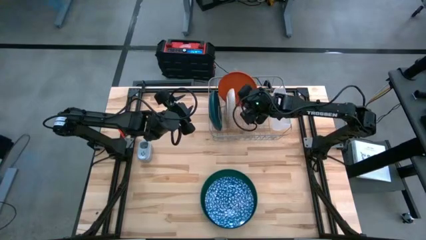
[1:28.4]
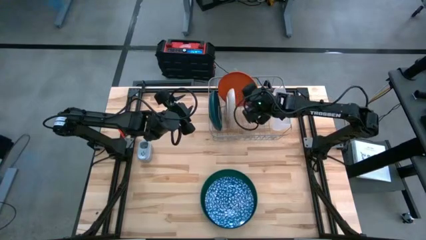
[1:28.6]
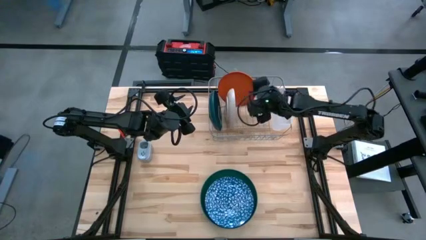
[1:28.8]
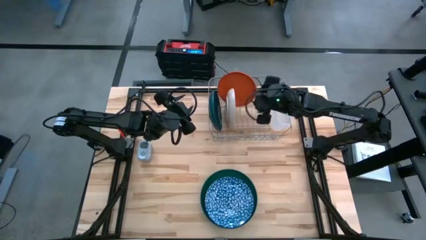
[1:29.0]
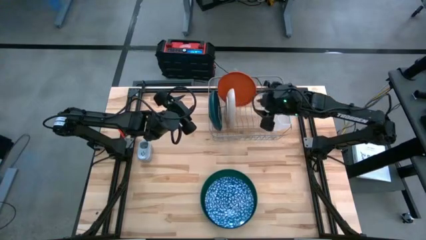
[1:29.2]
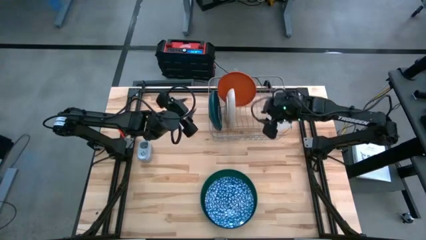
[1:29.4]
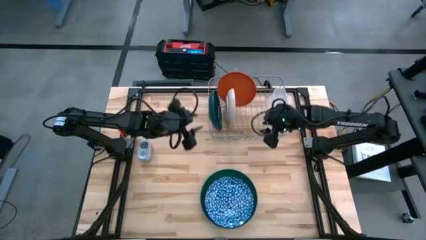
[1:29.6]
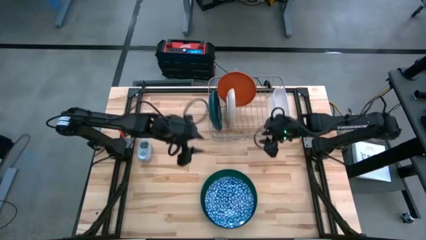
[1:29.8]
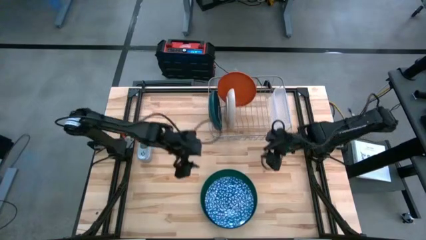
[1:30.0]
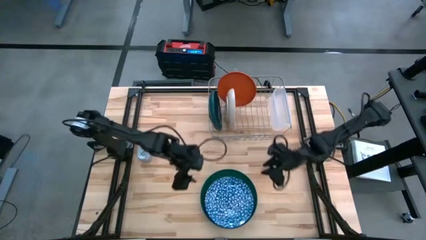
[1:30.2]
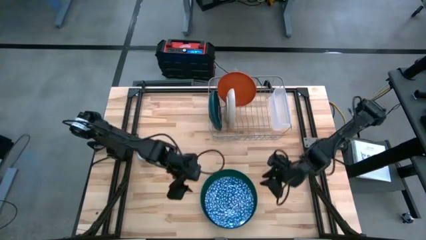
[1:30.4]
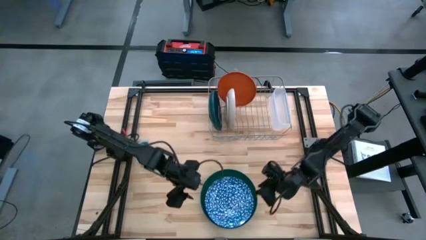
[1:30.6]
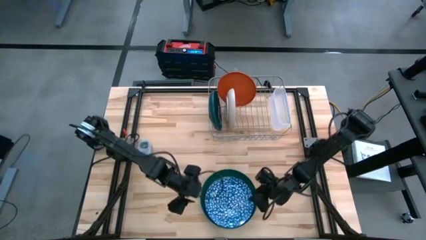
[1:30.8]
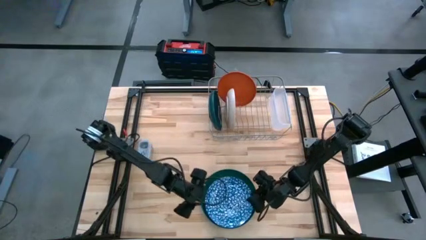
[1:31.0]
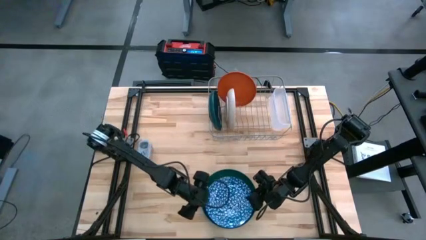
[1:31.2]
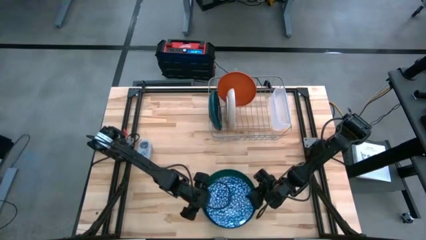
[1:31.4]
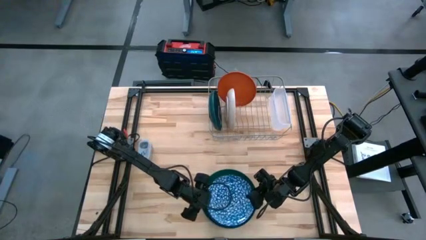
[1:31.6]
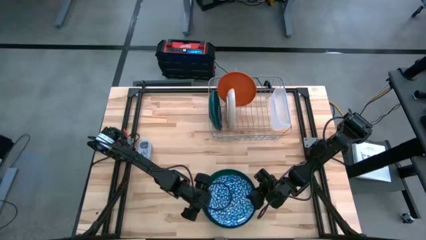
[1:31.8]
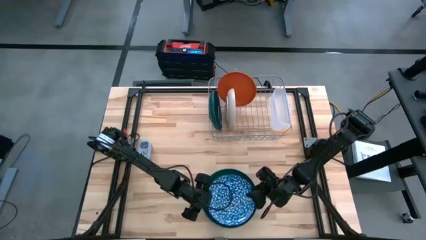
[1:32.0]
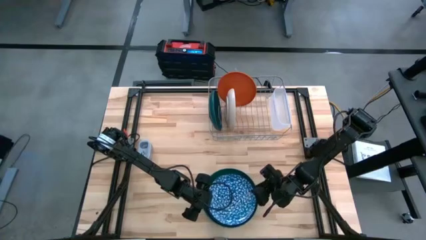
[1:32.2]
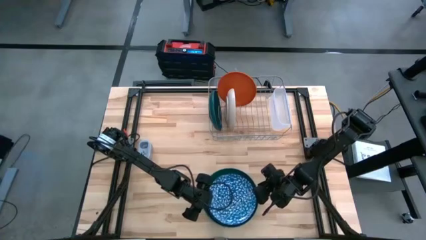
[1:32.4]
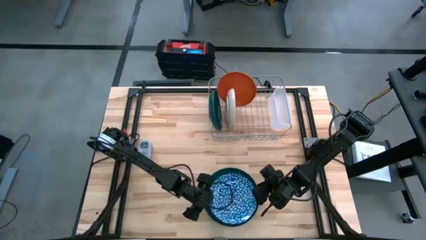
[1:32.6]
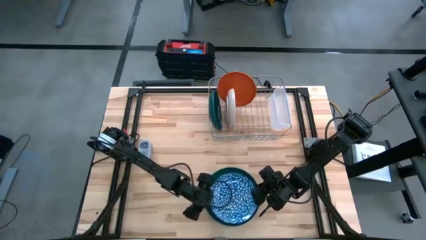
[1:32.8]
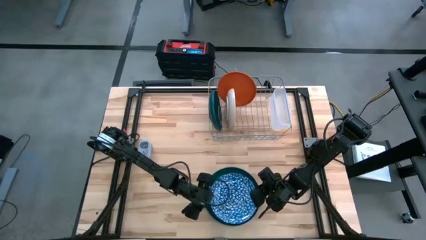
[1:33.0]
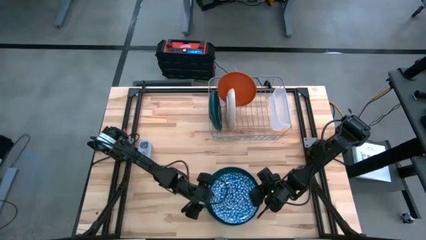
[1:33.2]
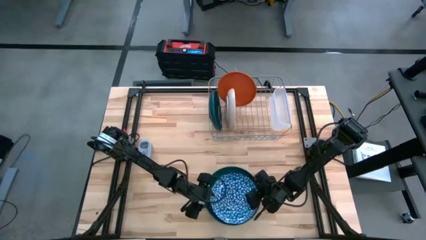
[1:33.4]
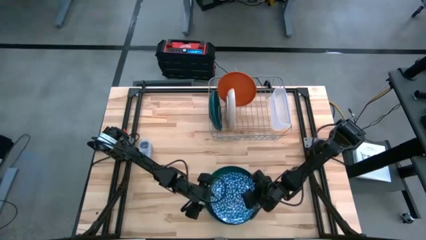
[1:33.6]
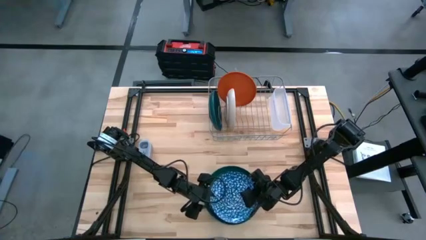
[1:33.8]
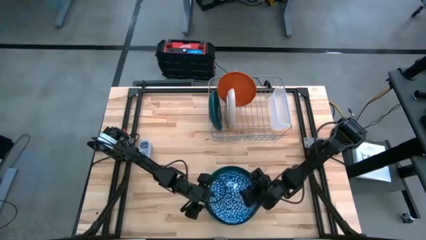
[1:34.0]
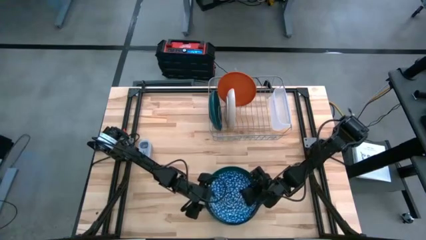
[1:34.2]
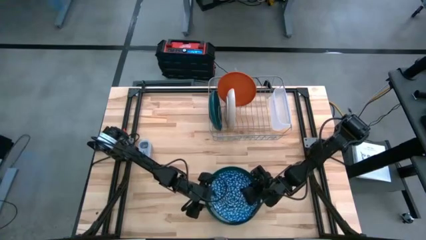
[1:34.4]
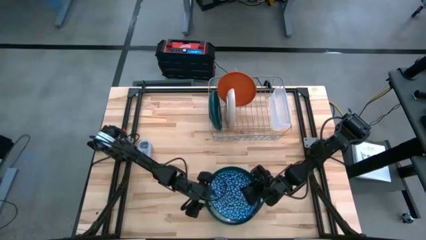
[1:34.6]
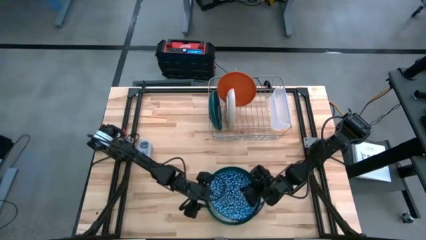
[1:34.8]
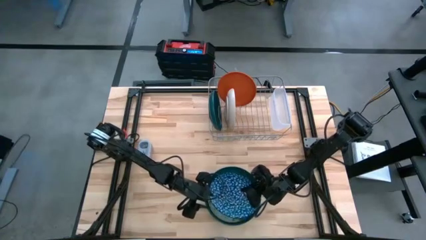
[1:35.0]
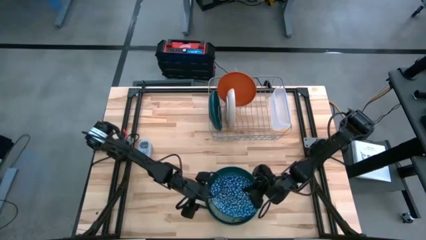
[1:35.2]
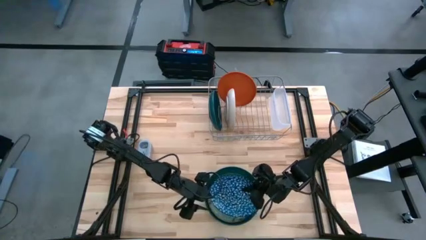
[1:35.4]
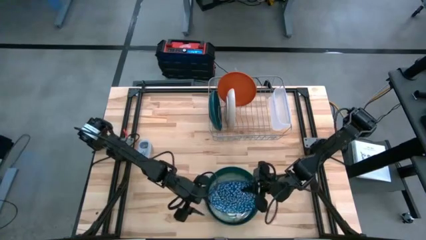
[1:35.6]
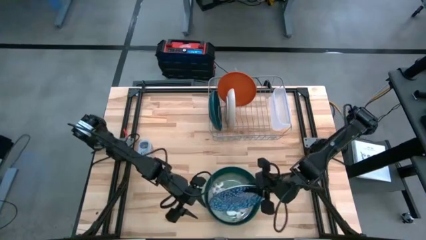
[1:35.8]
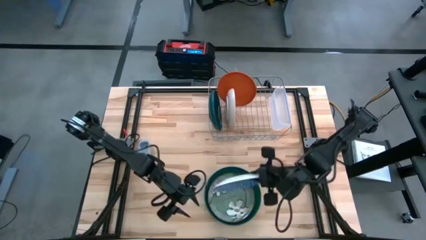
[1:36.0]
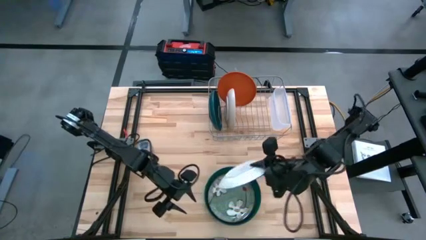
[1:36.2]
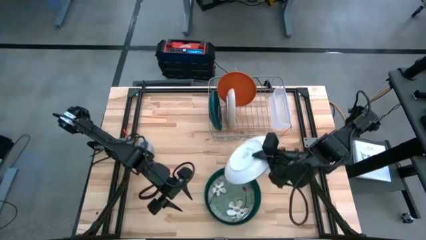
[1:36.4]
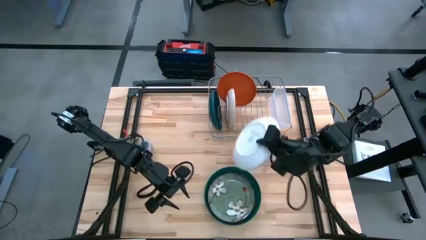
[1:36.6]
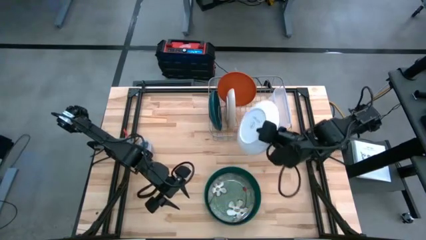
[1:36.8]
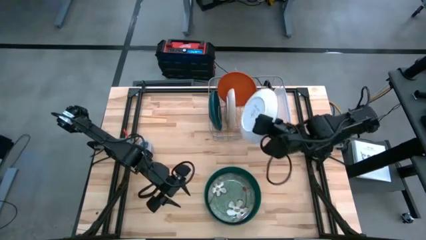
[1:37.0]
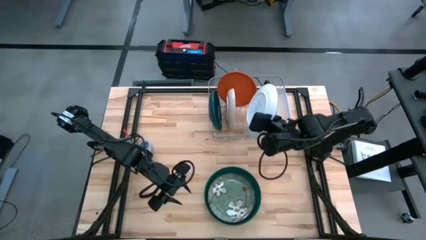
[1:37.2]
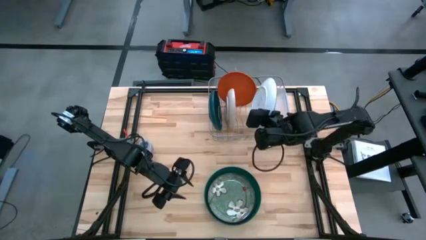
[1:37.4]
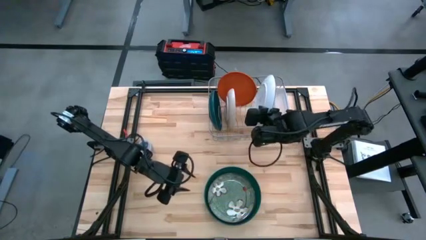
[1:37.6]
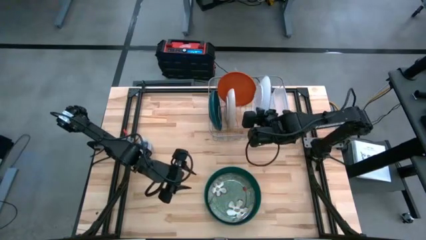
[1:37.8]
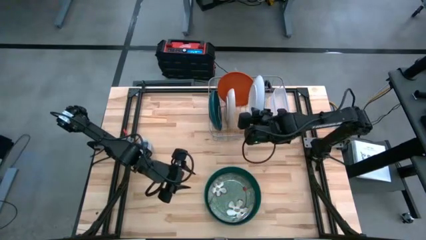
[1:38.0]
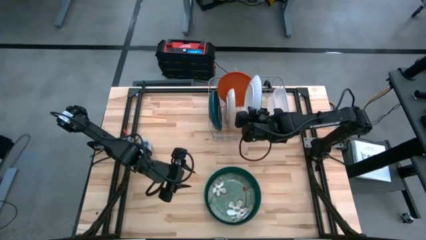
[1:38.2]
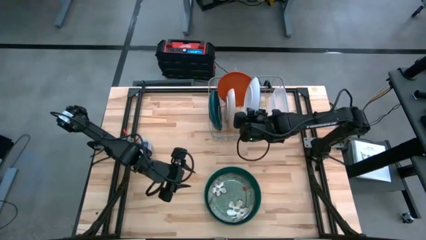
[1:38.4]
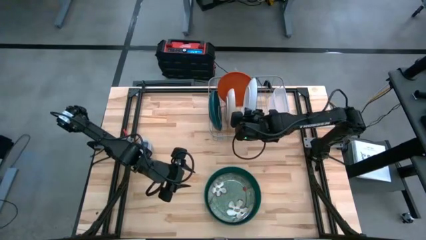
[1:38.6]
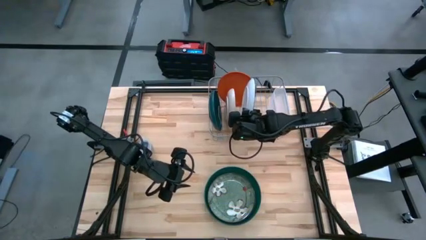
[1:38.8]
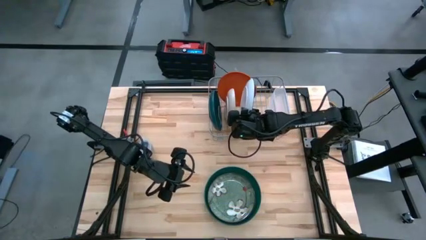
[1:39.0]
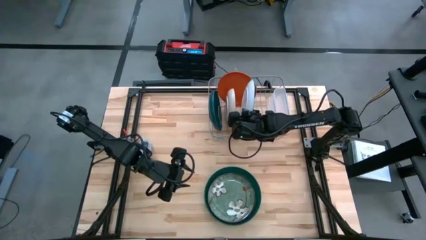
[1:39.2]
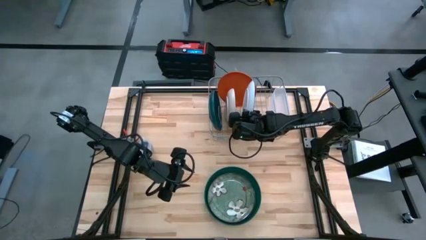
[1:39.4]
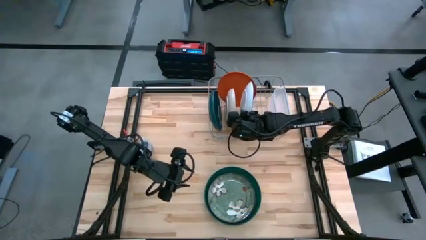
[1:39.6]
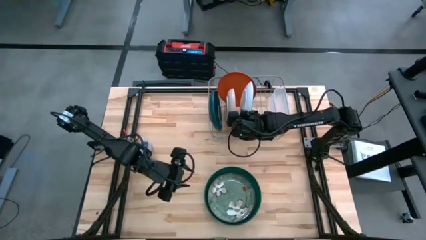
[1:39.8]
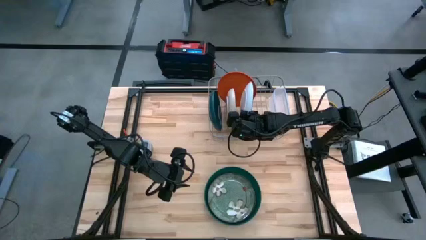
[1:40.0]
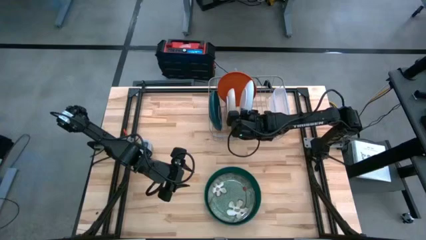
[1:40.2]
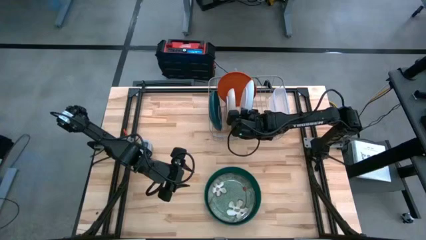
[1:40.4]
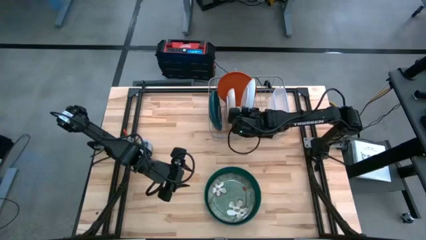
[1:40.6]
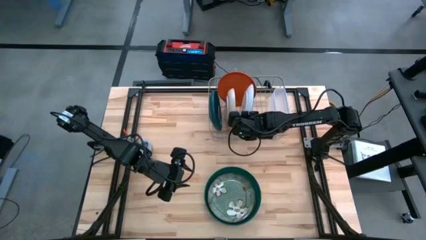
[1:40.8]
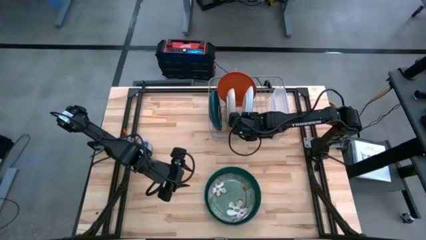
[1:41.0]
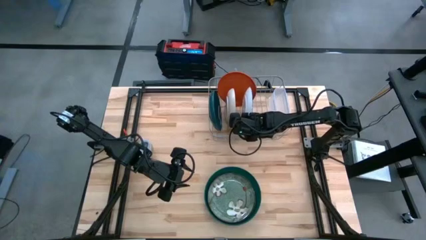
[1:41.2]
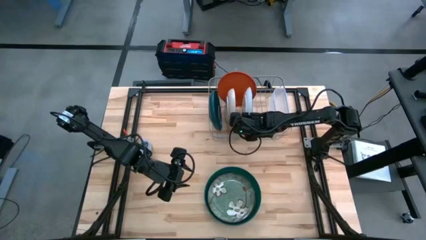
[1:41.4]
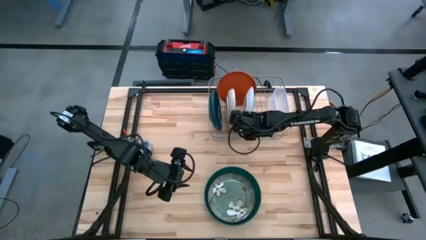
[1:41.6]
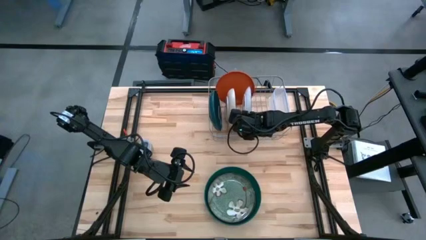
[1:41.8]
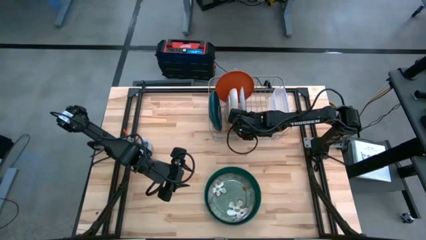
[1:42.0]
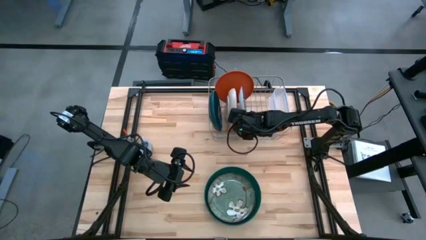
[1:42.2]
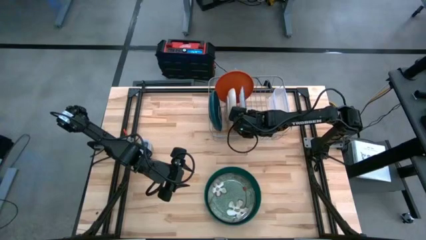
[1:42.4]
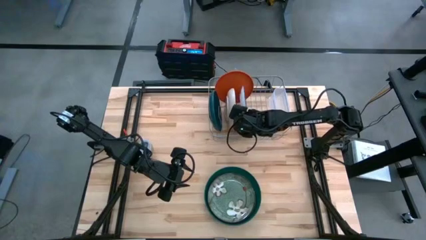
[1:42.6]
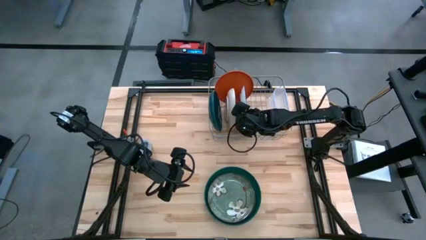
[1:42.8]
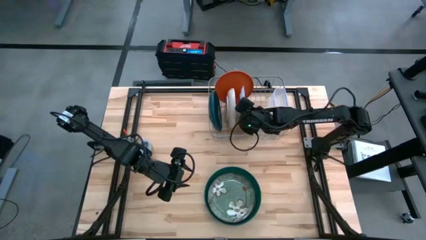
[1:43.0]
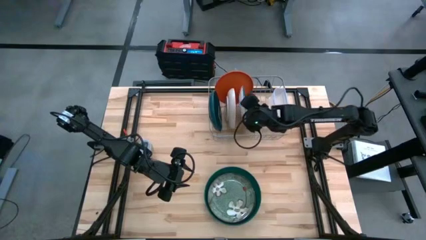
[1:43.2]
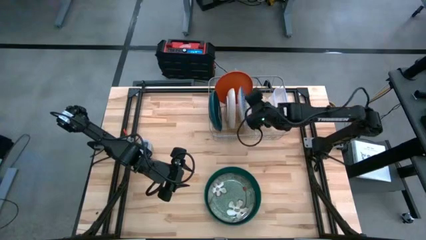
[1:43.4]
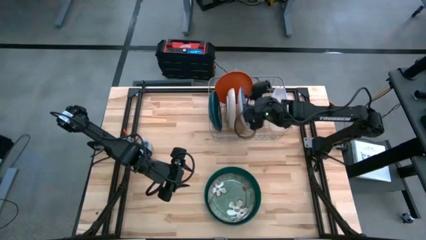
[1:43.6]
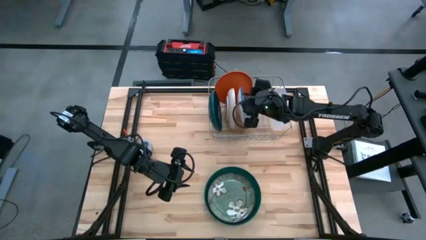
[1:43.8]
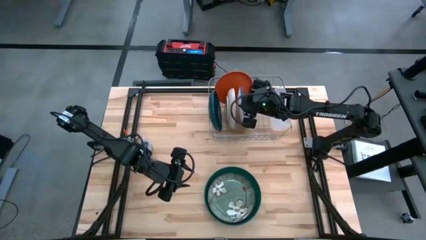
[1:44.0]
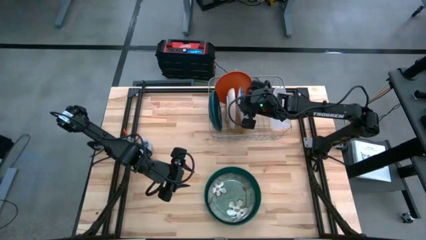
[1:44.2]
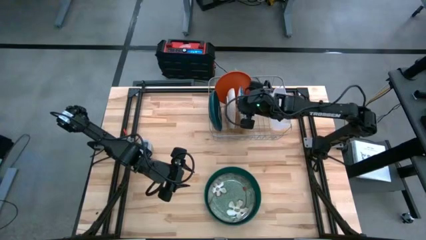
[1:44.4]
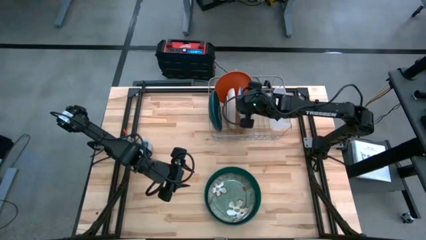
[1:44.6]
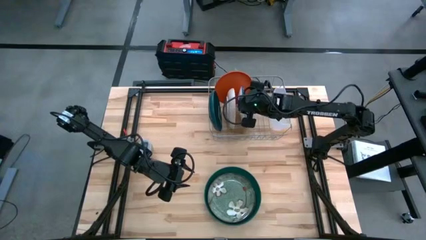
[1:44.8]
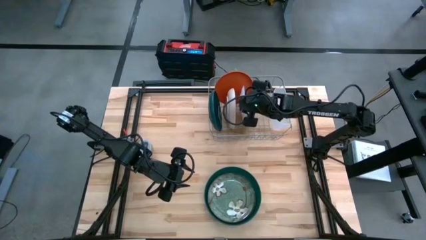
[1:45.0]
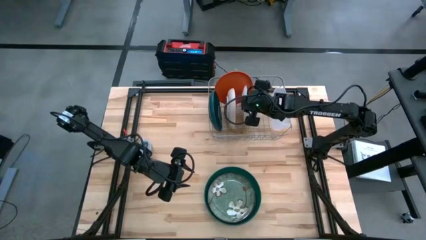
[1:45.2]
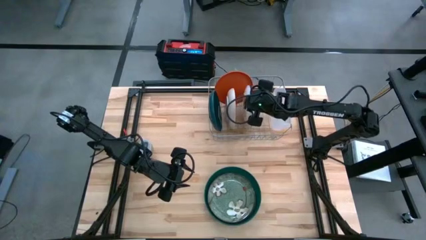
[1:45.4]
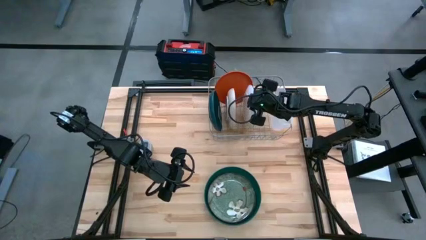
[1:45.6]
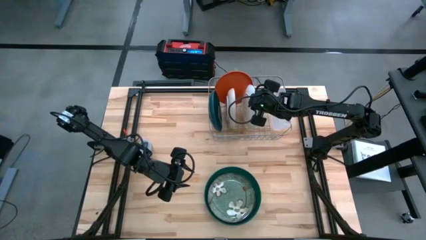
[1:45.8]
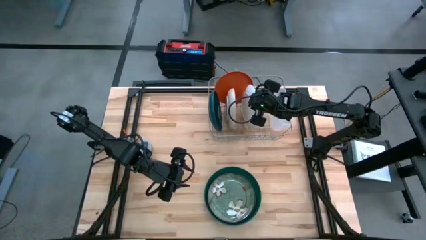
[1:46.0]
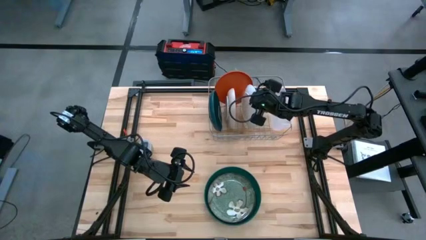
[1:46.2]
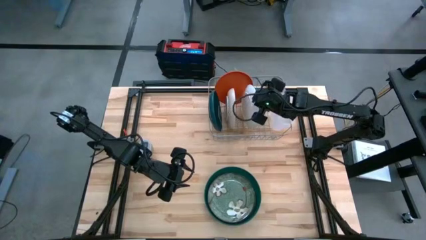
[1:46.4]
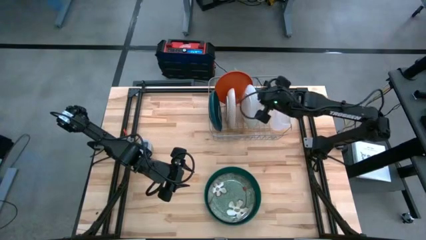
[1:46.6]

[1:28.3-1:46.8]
Task: Sort dishes
Put the blue patterned plate in the dish rack
